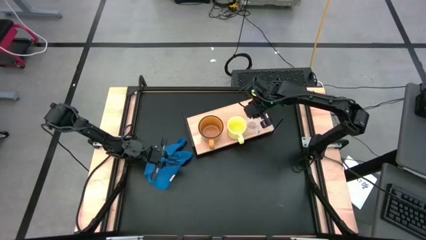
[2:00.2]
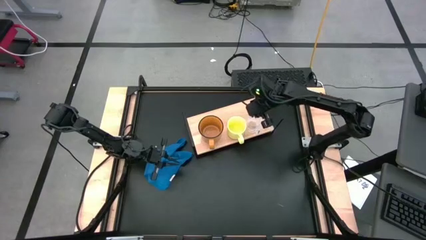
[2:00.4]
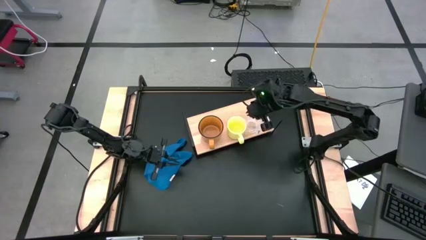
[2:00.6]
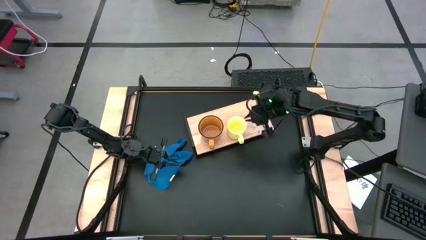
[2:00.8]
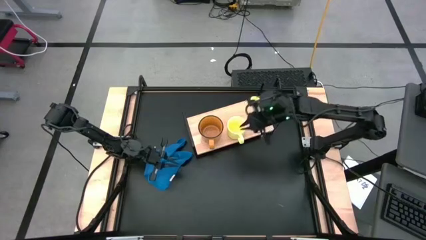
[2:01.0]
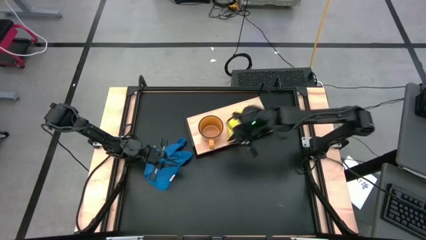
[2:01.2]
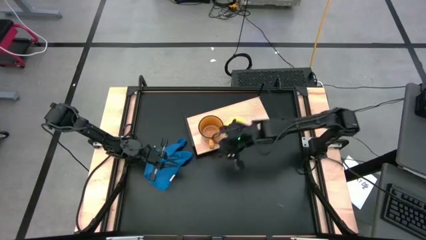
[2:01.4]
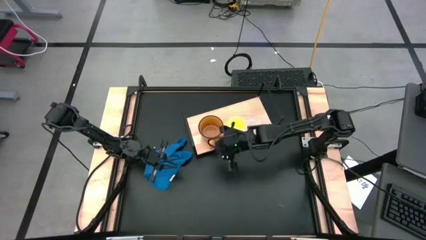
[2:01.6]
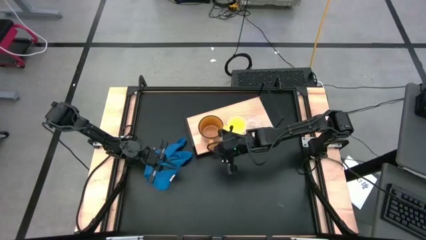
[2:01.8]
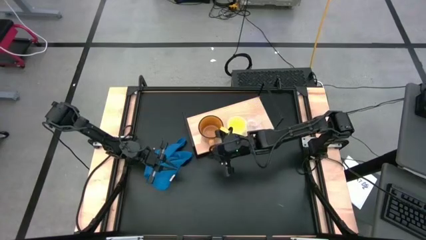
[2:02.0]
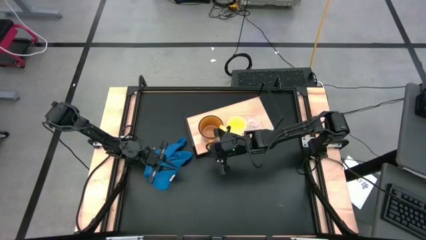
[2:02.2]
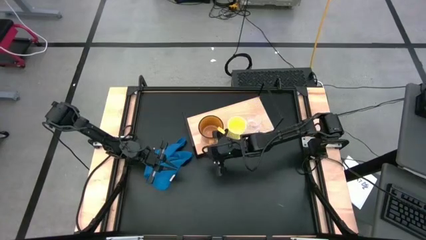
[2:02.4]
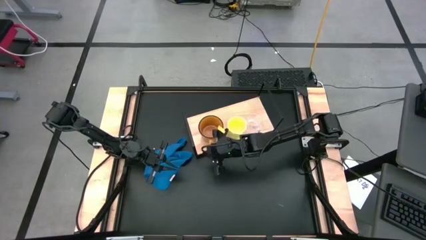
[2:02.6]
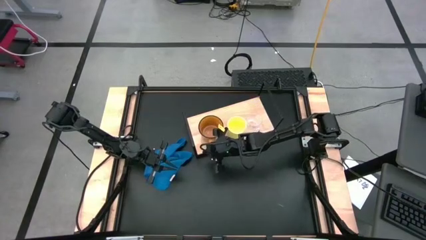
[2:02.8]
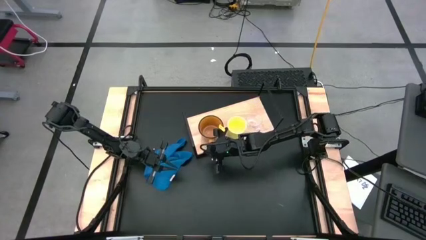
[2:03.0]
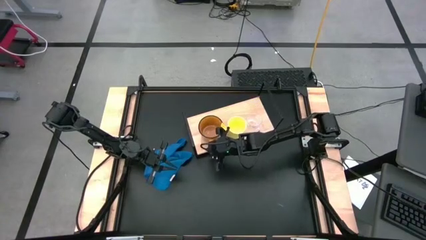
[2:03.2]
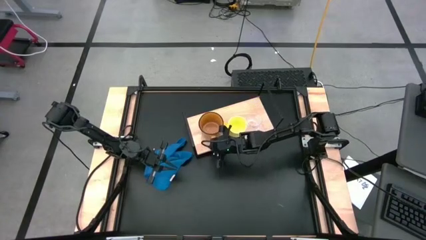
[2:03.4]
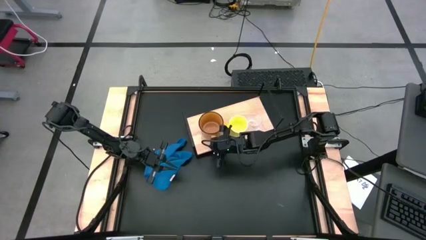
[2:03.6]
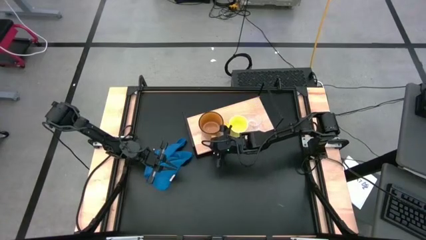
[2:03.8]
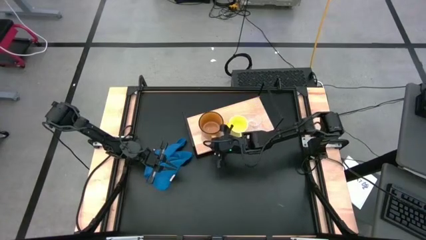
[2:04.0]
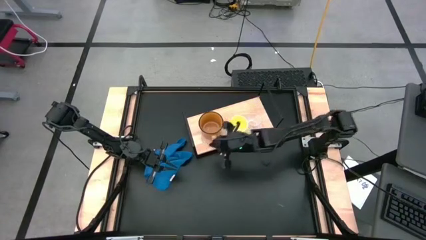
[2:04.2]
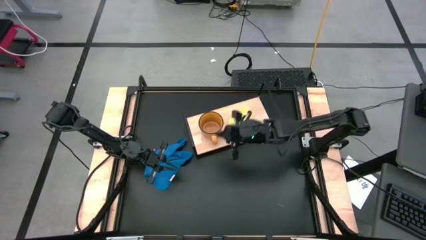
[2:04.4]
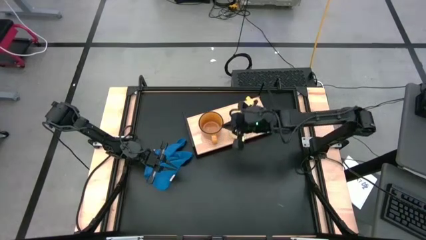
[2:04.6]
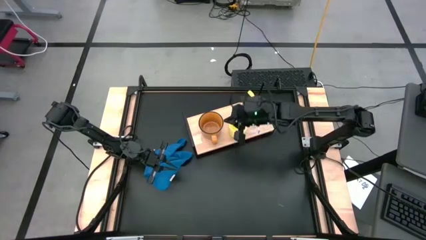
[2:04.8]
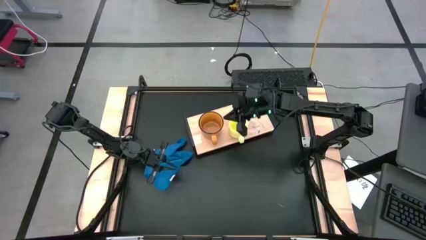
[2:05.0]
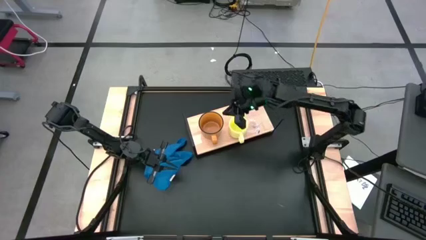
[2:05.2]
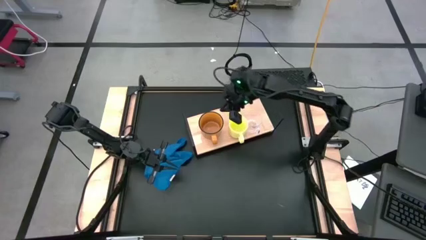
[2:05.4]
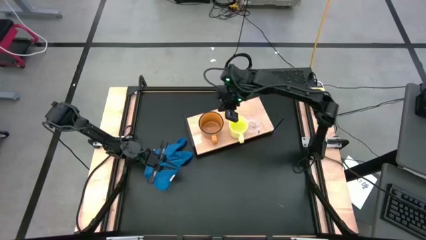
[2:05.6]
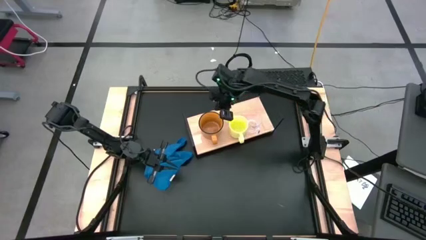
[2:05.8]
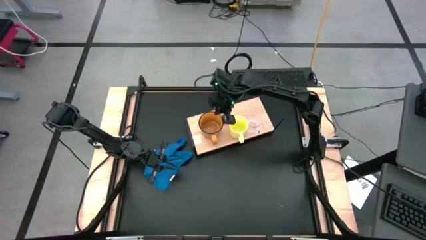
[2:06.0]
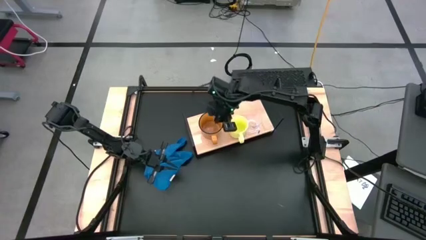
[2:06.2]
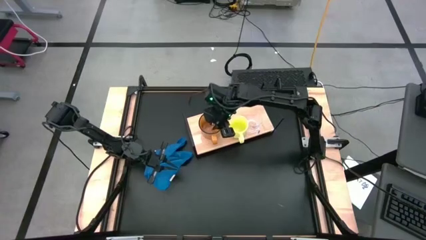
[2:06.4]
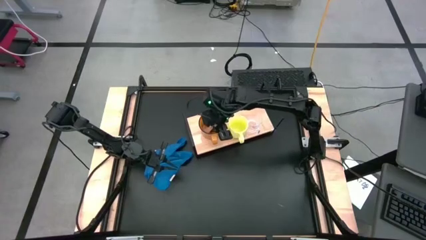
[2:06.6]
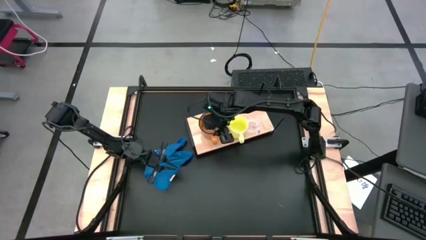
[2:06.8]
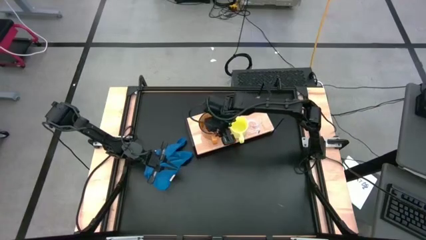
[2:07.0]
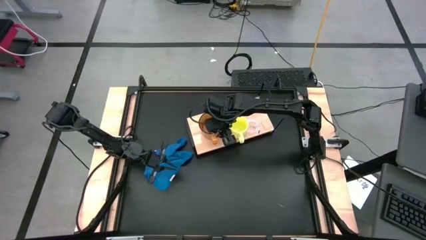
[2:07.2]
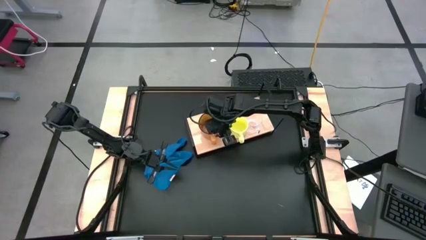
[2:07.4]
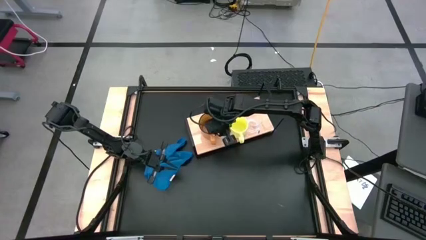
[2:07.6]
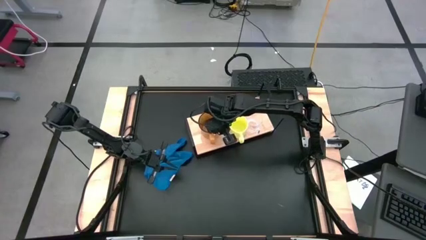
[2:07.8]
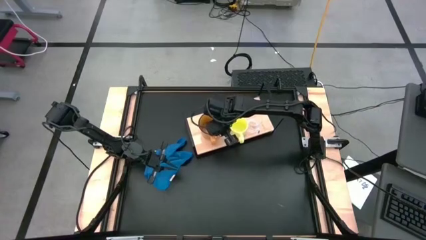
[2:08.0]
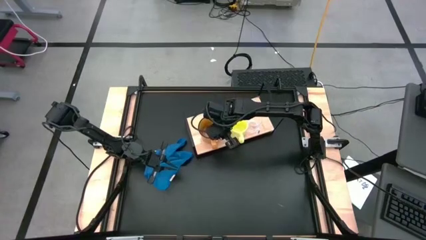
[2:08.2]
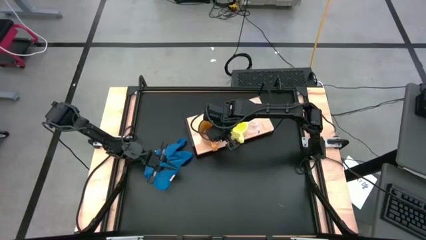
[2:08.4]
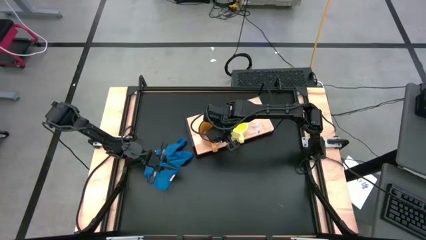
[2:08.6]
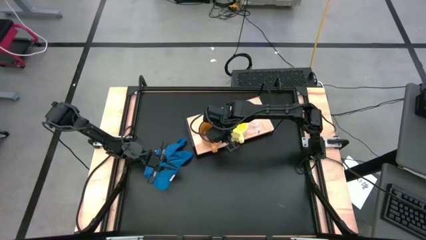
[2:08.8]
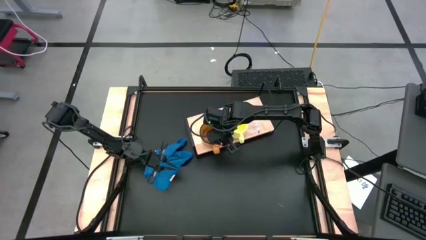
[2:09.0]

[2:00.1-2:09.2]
Task: Stack small to large cups/mugs on shelf
Adjust the brown mug

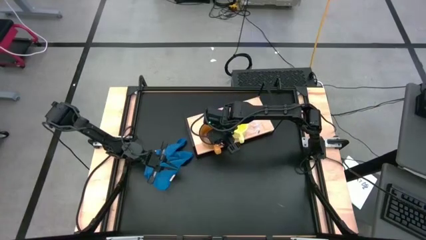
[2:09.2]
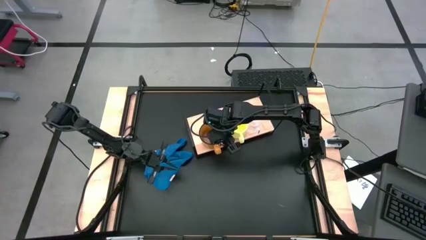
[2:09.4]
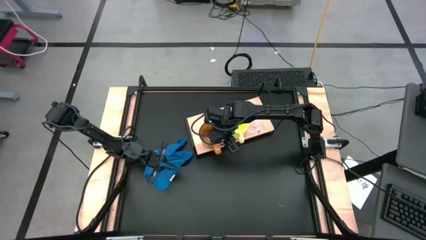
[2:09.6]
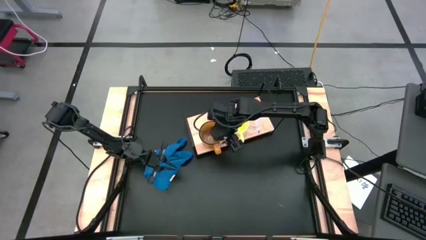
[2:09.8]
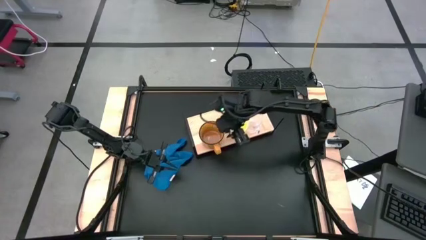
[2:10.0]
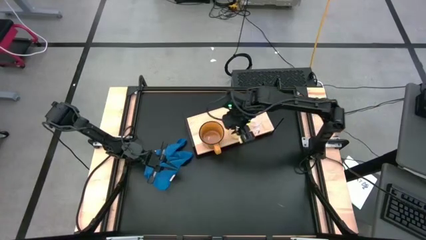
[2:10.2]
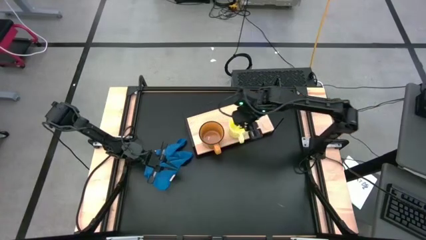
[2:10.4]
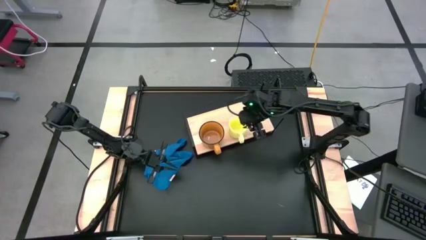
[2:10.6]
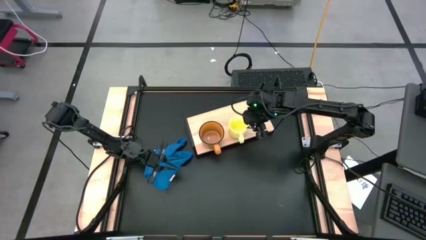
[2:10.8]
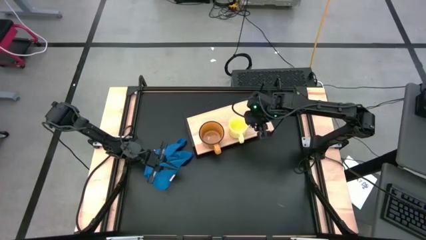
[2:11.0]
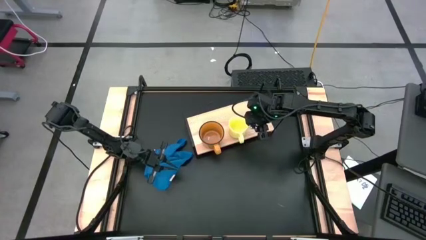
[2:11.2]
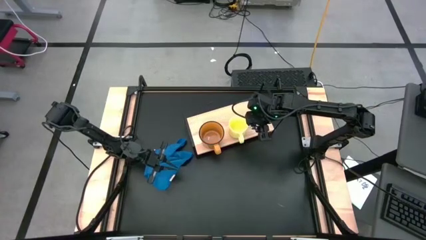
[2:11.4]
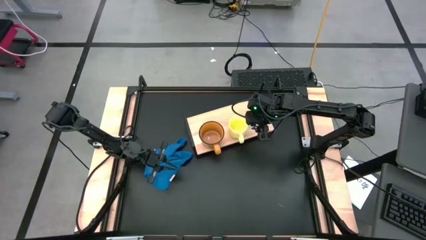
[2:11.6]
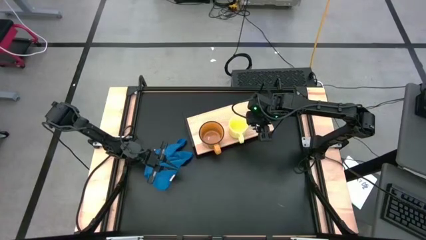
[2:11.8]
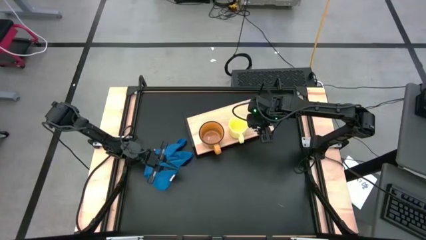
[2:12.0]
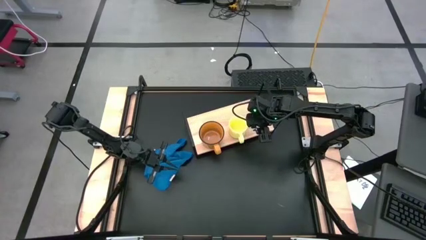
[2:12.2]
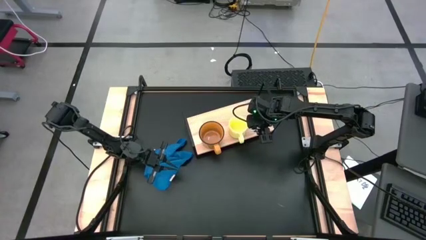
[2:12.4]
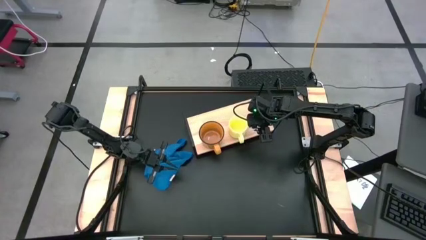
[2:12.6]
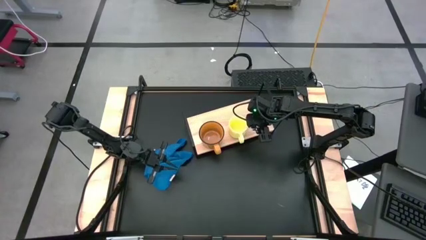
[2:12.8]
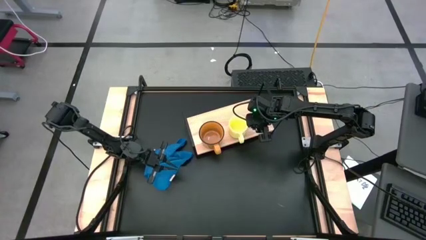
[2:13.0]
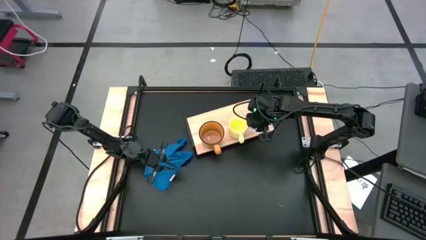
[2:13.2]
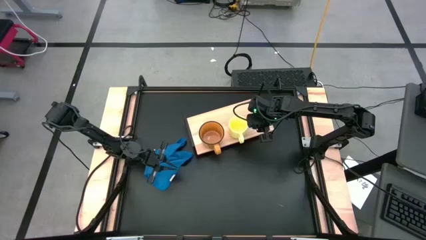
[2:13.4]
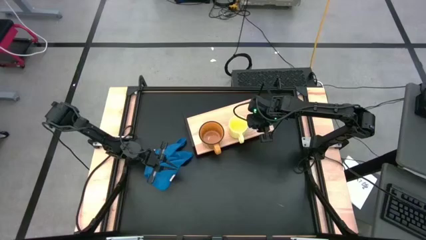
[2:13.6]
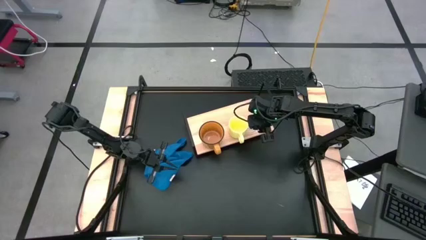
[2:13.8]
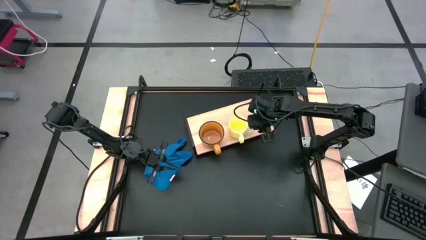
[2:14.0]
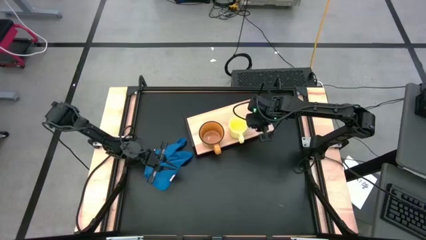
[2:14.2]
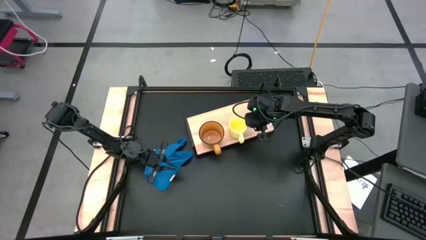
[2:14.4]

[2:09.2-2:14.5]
Adjust the transparent mug

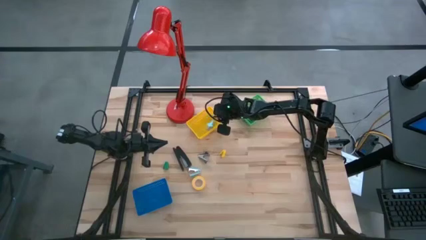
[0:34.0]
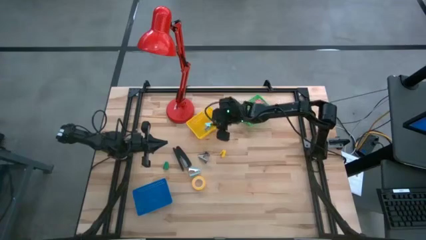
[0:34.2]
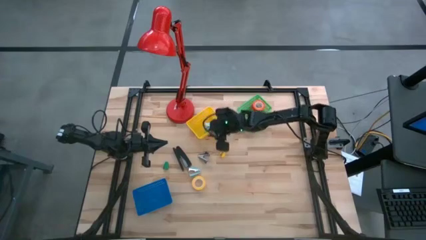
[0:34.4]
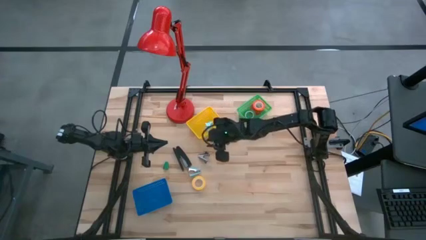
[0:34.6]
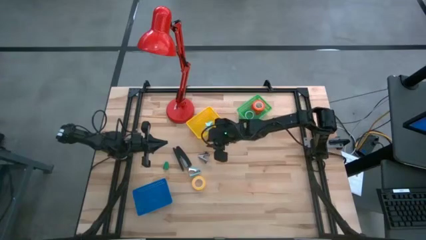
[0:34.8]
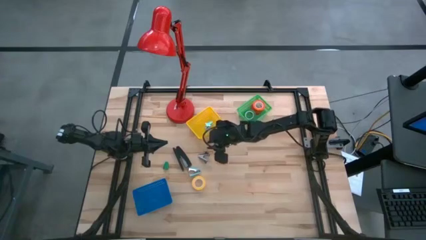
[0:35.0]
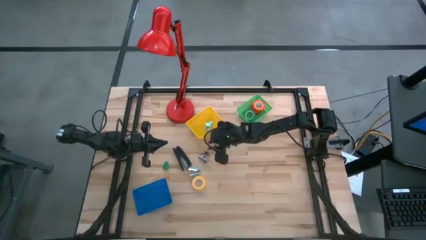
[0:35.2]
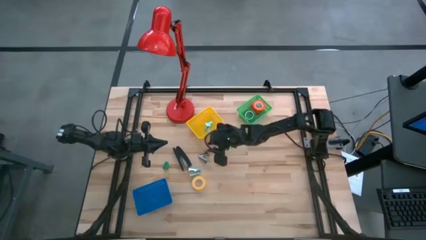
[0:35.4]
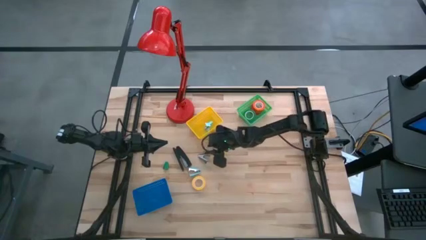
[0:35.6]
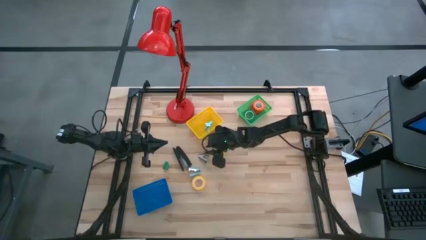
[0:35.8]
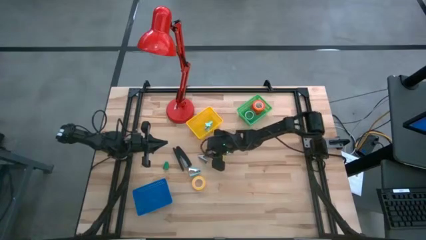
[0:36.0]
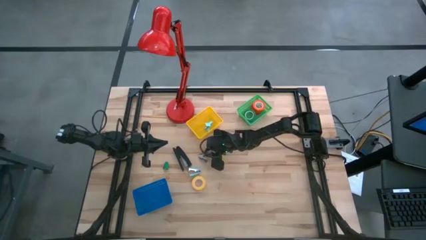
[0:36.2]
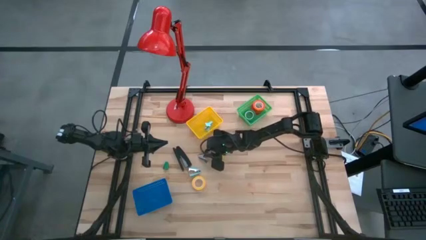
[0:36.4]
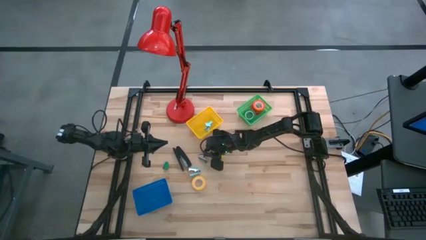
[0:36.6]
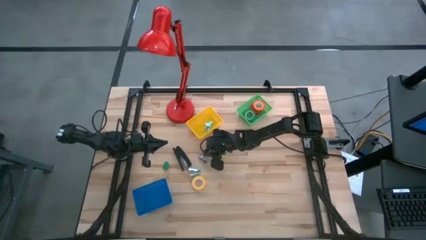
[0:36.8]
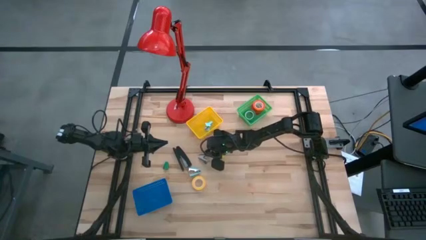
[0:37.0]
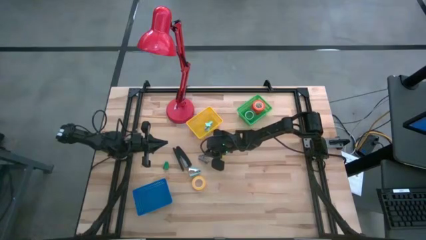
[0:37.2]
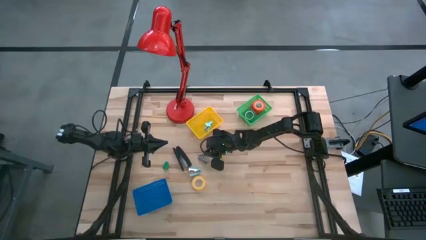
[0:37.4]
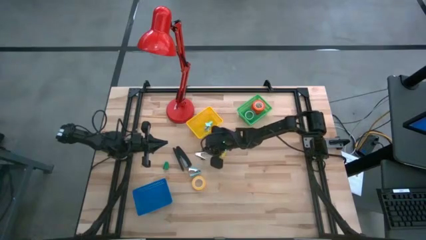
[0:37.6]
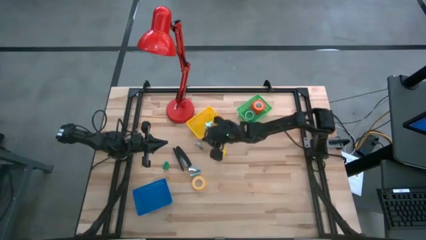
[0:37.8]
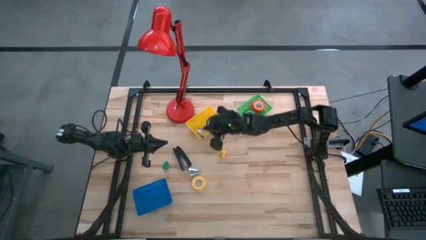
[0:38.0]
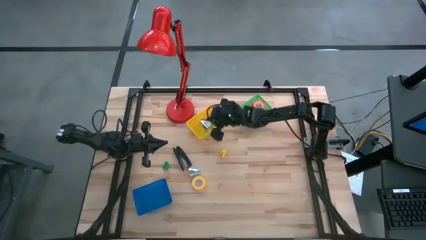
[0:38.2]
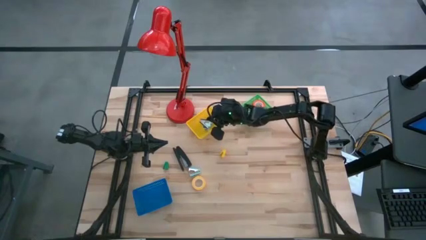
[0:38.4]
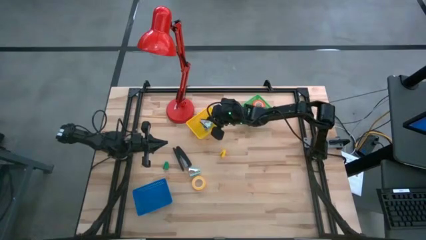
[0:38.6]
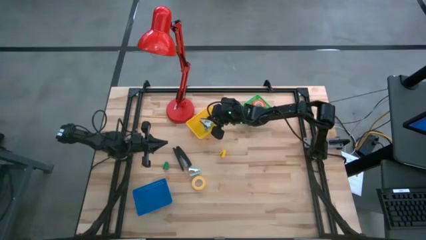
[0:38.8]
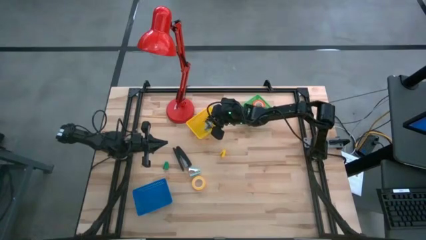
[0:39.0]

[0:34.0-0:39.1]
Task: Pick and place Stapler, Stapler remover, tape
Put the black staple remover into the yellow bin
